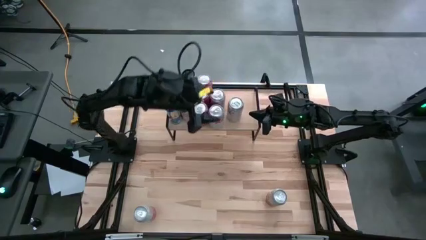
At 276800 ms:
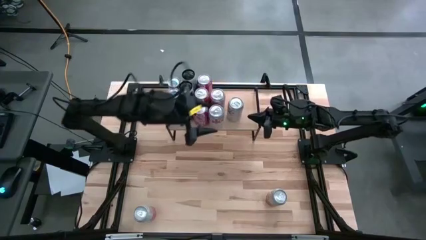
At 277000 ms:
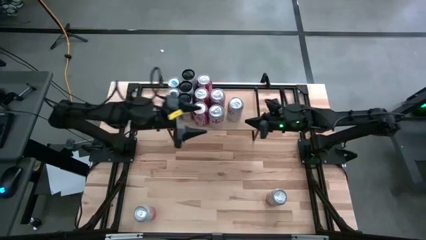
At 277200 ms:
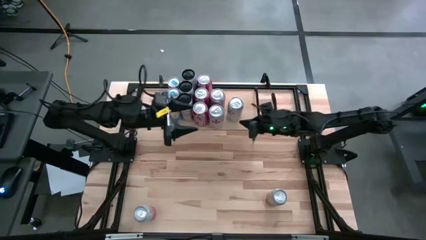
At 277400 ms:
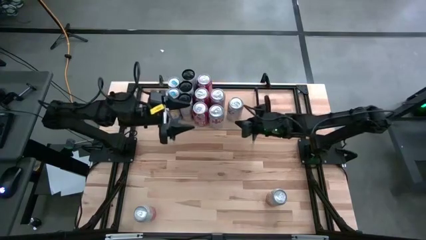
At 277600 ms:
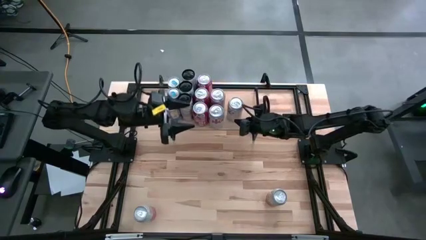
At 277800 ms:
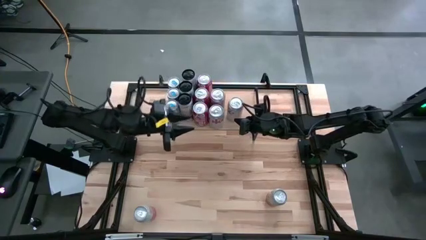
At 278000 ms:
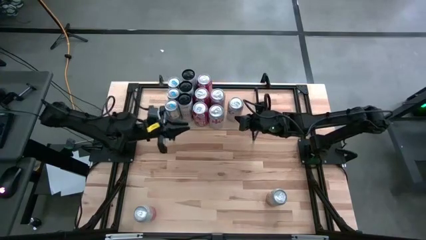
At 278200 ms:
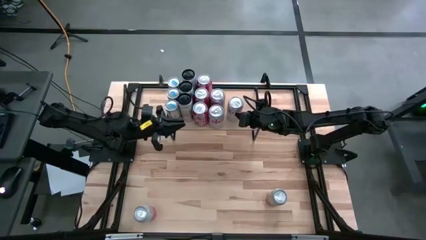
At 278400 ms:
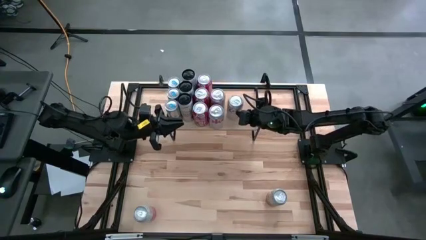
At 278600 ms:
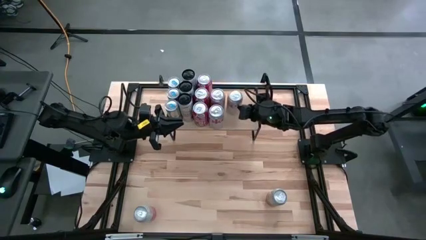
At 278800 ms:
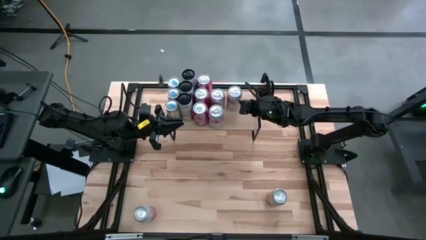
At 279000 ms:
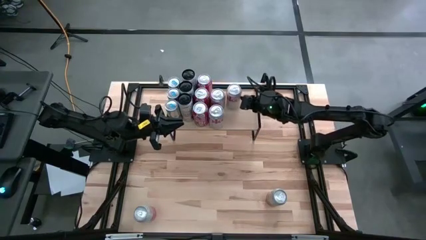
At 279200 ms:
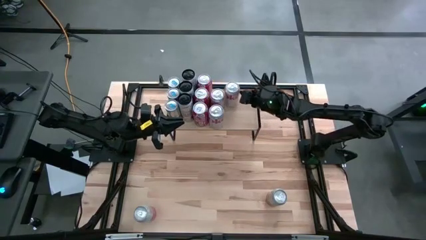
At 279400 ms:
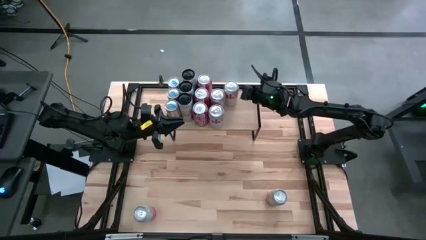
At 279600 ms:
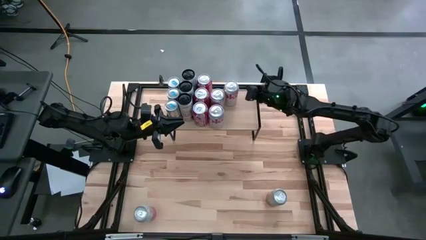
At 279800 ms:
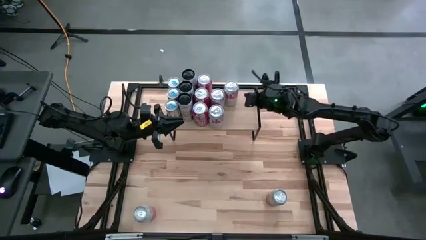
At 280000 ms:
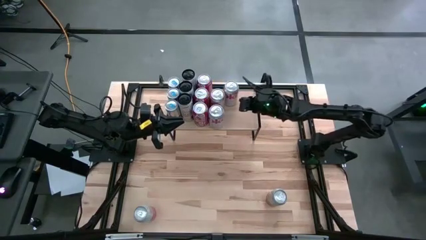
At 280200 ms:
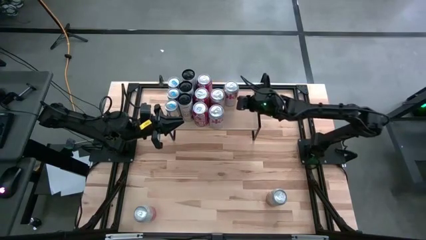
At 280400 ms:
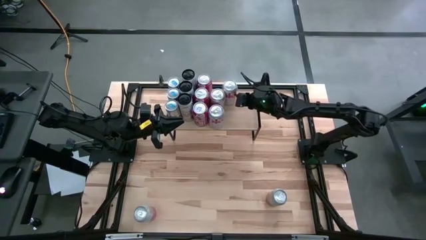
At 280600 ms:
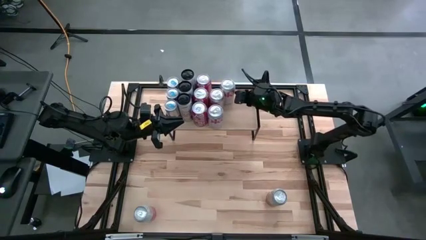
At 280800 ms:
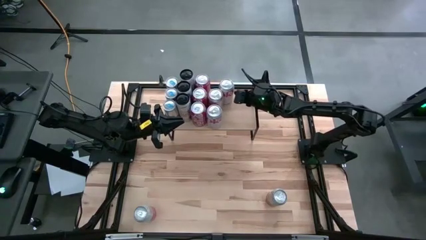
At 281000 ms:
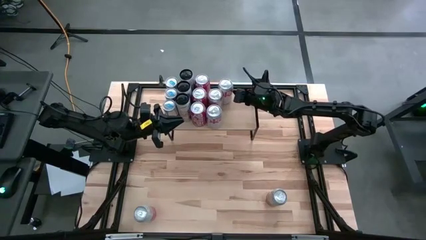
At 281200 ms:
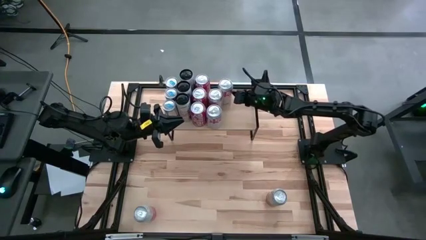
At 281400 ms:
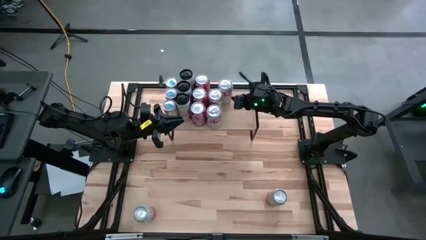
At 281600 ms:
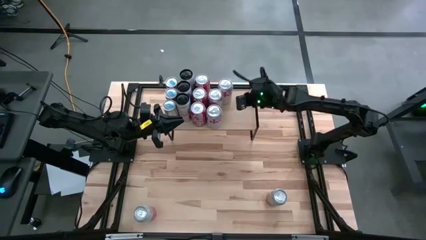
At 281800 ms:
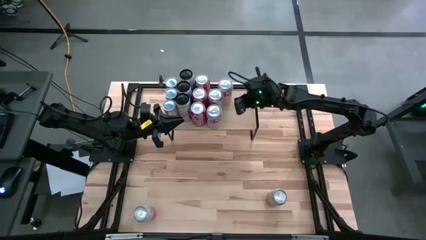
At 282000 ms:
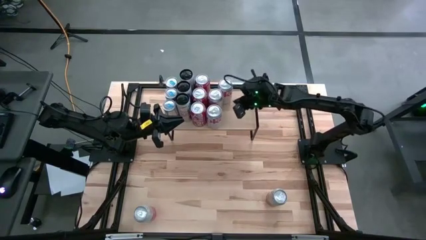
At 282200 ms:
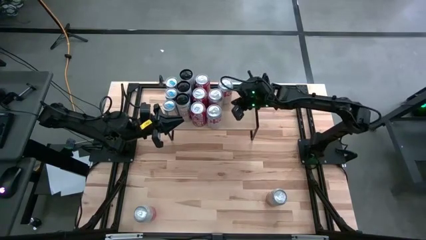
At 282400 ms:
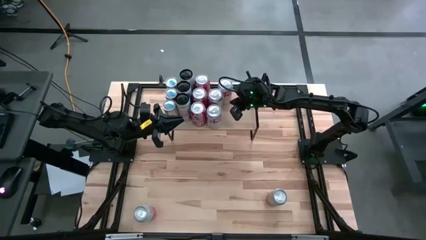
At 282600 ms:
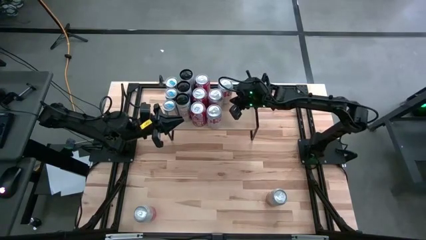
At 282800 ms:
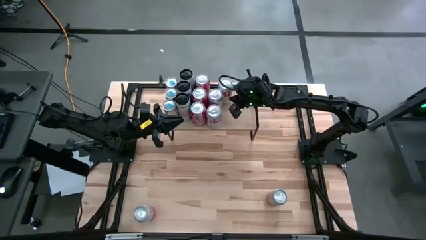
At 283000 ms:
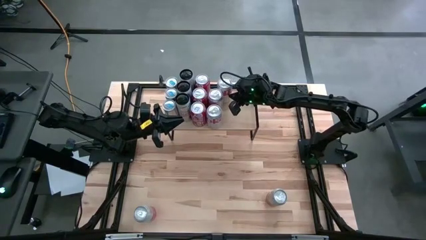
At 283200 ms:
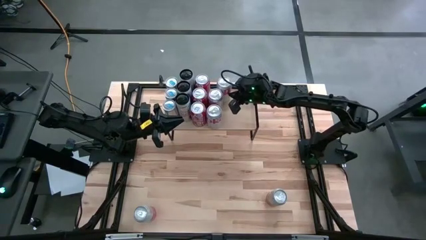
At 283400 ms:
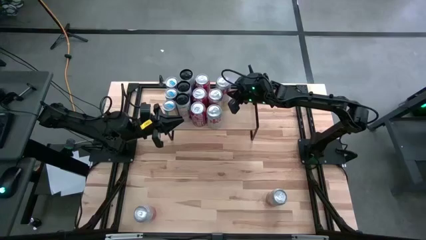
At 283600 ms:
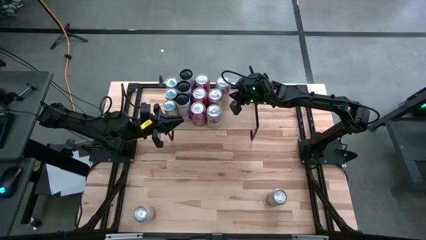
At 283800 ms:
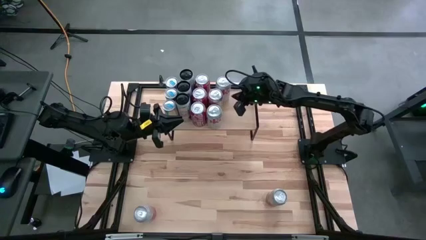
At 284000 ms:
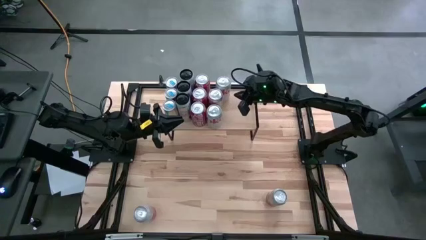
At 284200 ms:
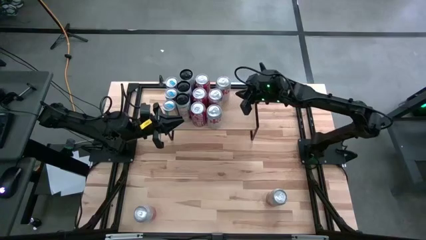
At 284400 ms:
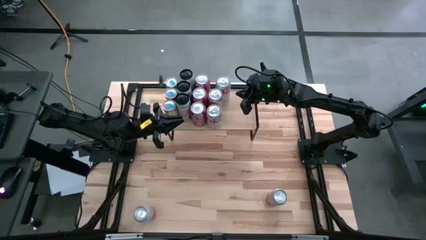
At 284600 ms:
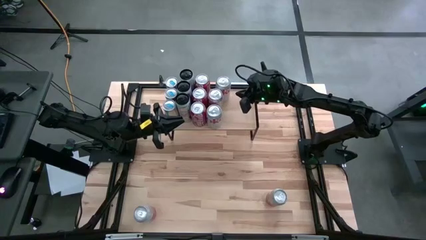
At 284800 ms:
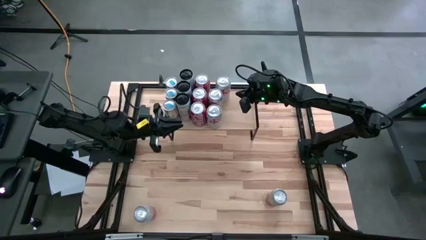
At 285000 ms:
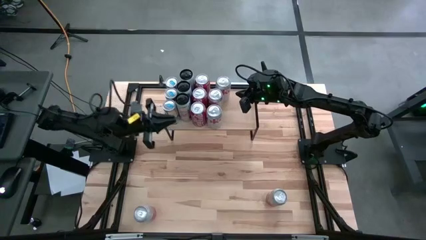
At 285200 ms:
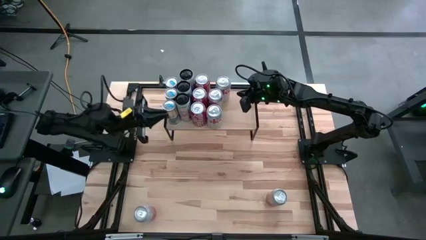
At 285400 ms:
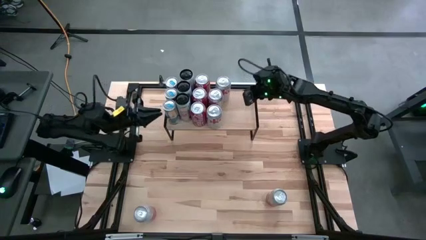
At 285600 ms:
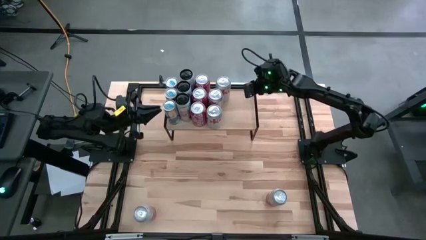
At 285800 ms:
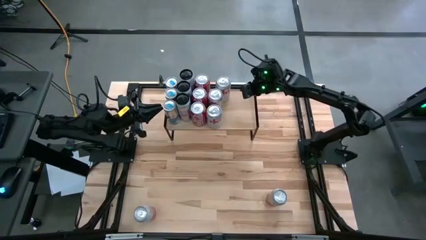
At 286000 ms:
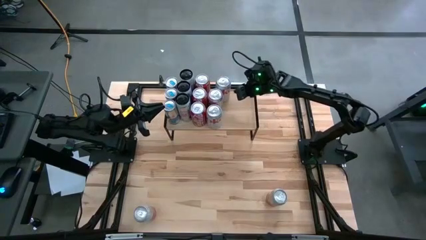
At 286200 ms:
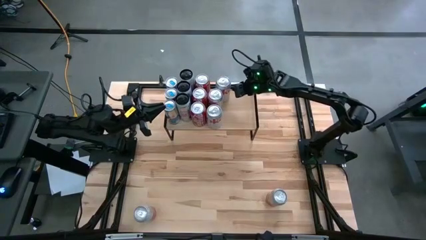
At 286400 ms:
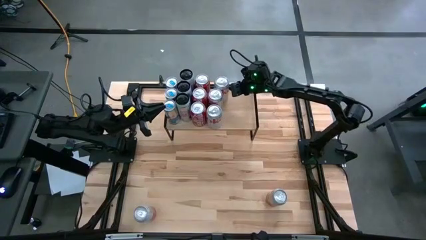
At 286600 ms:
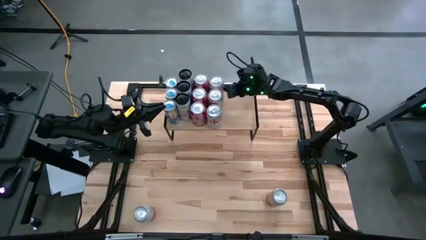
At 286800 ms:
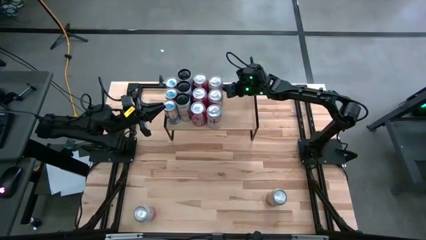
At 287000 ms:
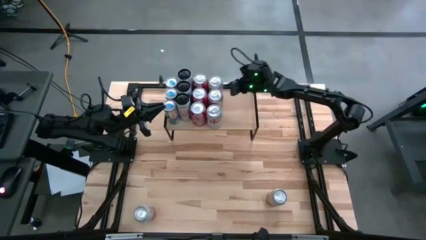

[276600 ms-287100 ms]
Task: Place canned beverage on shelf
Put the red-silver soda can aligned with the other red-silver soda cans on the shelf

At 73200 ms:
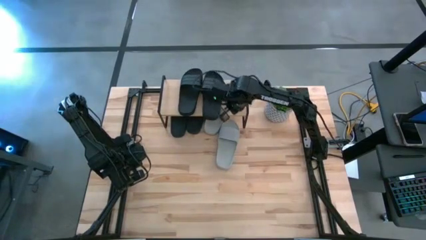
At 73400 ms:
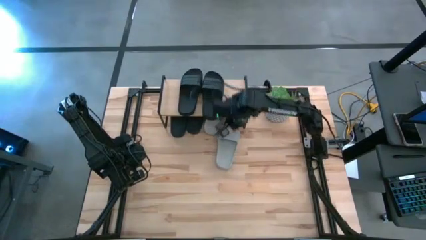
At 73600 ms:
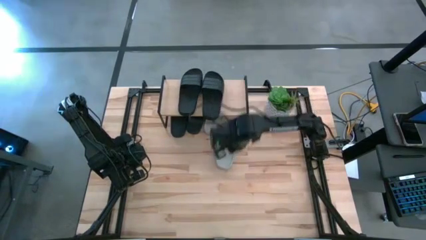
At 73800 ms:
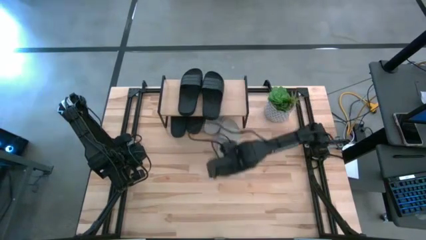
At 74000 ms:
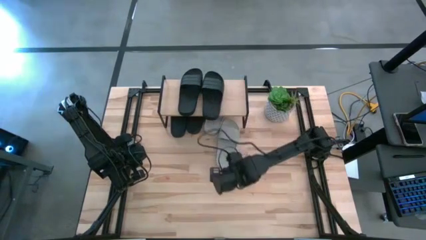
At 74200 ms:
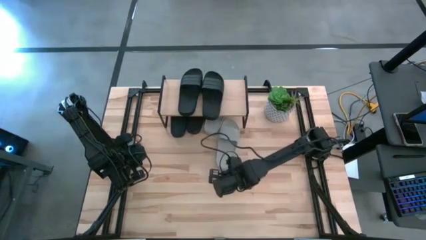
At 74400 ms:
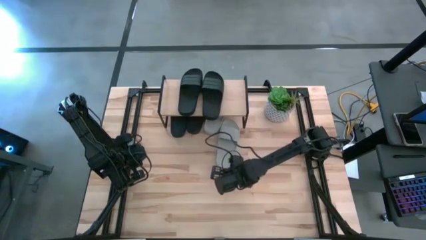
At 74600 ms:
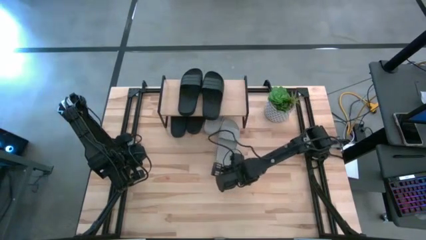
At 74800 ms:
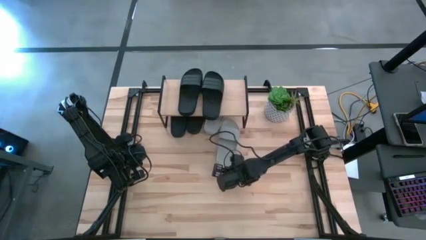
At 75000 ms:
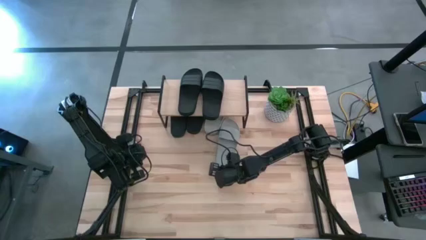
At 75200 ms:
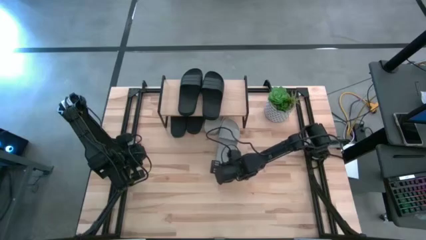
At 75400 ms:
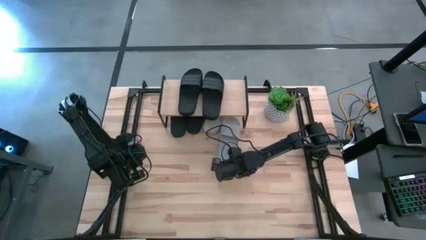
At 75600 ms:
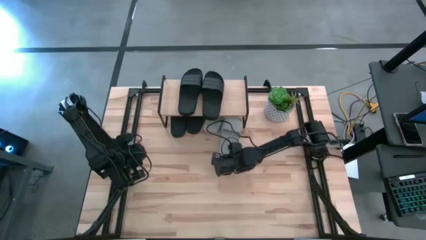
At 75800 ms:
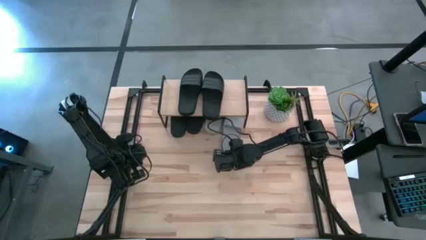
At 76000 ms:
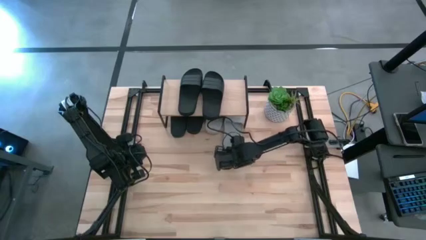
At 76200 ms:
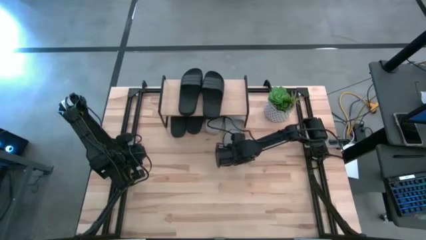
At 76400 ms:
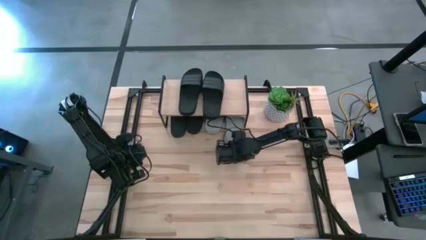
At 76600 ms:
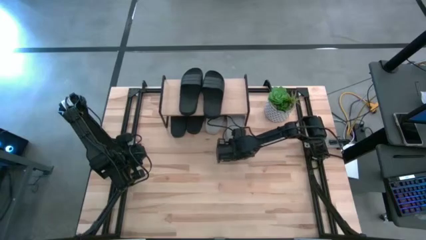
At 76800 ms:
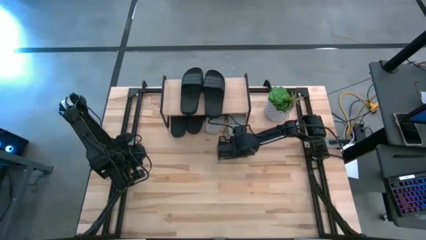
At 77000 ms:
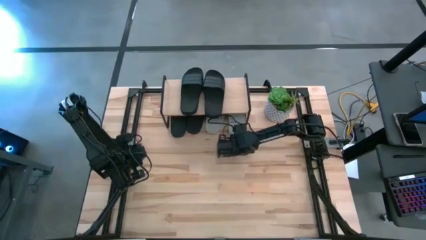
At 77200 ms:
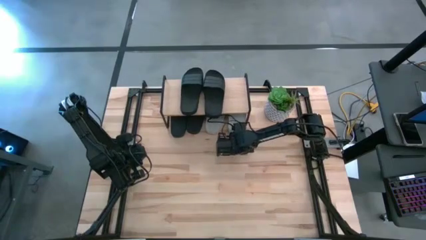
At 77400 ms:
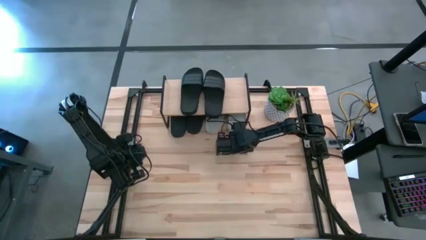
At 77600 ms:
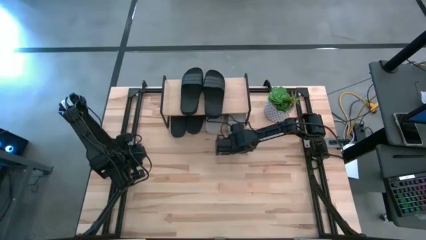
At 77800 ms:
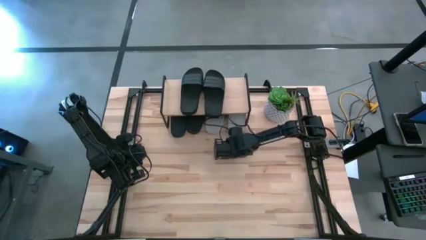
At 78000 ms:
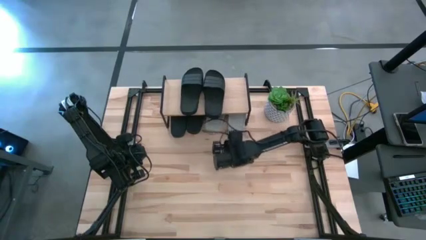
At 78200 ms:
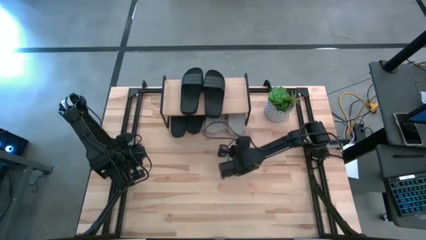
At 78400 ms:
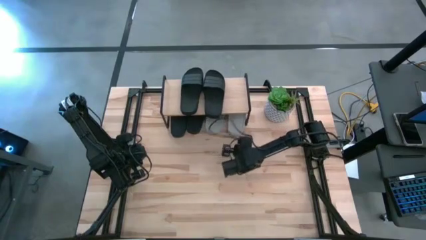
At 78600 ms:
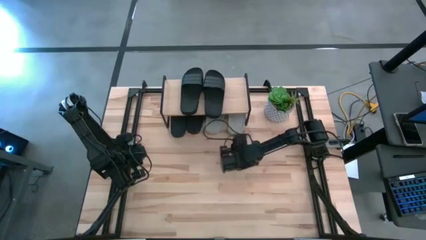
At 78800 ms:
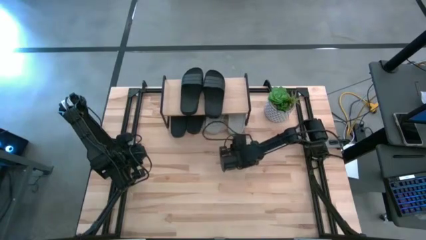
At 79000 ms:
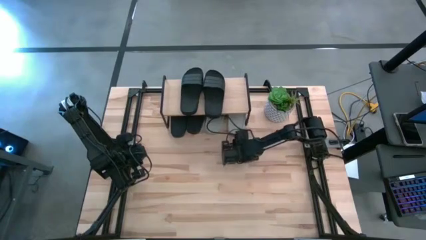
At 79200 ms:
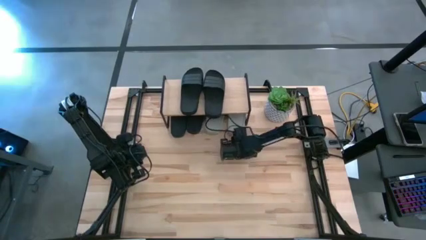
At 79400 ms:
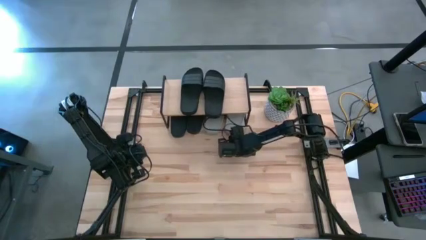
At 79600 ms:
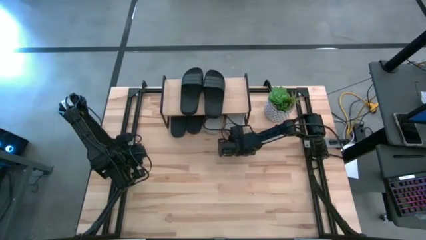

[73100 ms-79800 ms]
Task: Pick and place slides into the shelf
Put the gray slide under the shelf
